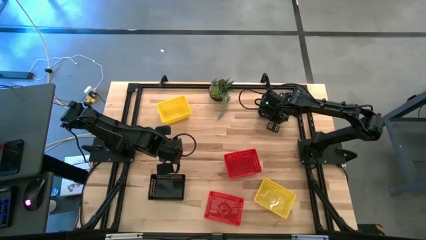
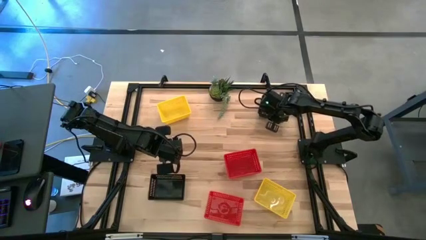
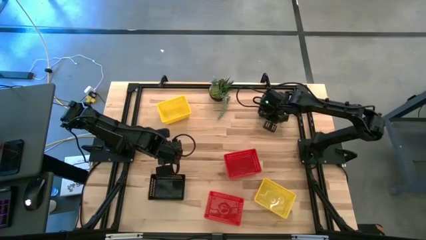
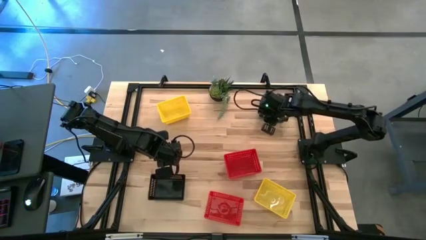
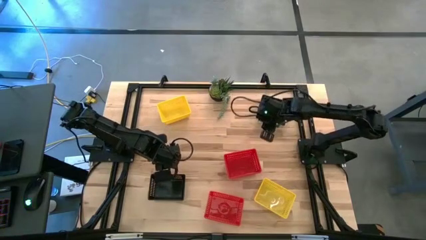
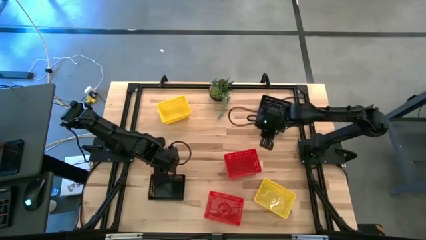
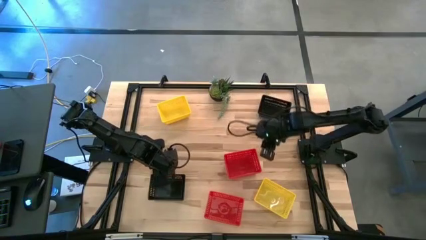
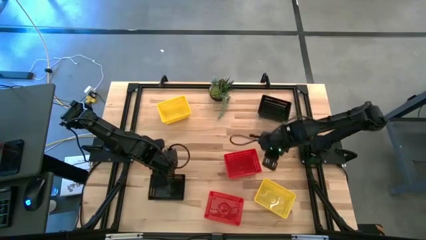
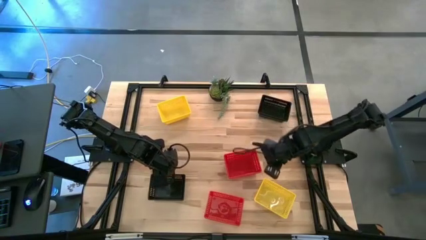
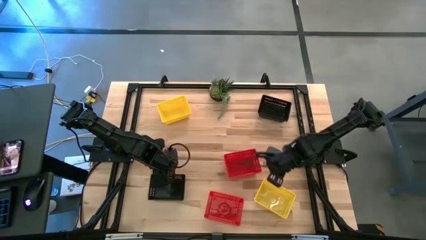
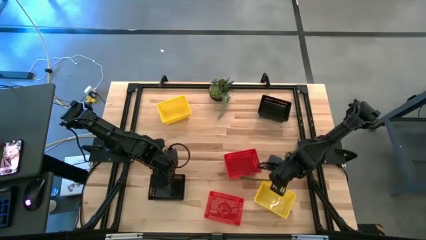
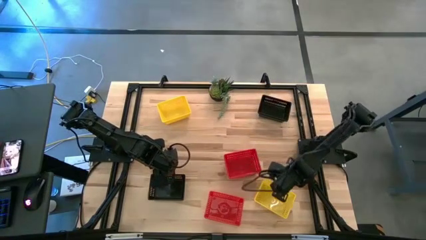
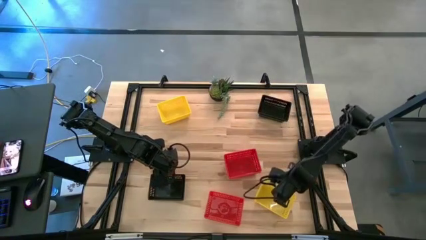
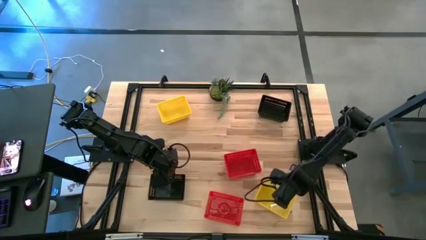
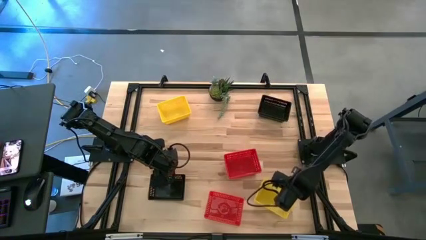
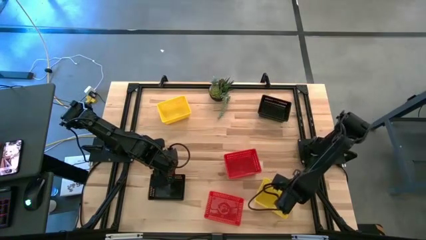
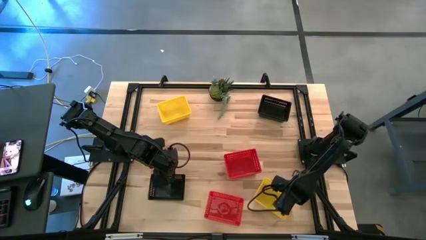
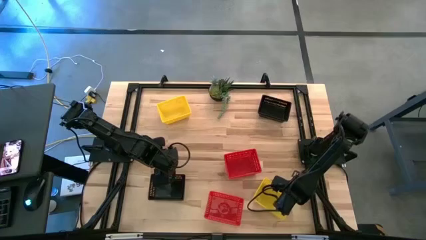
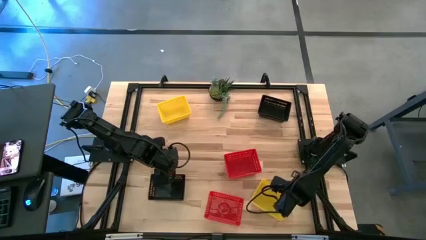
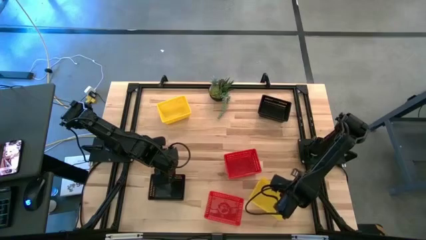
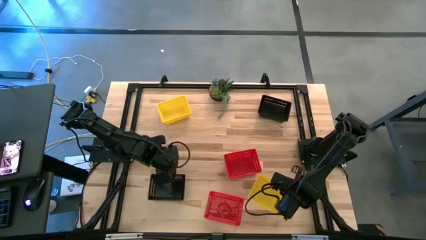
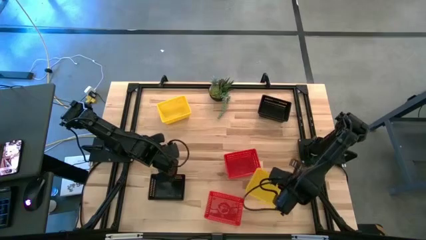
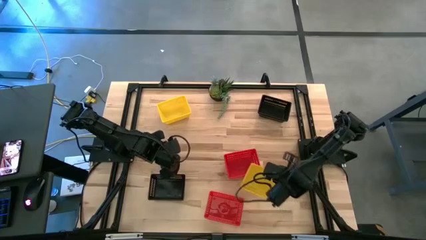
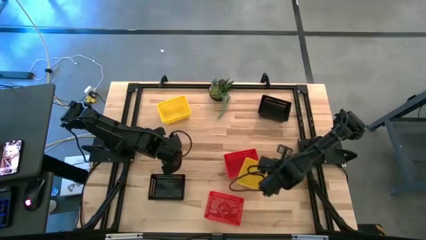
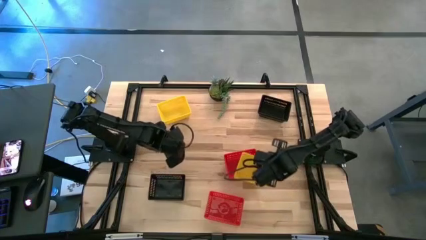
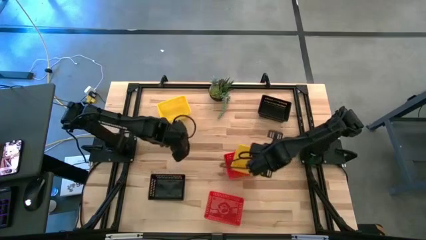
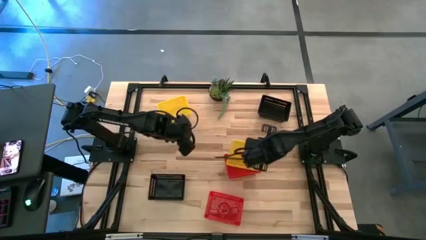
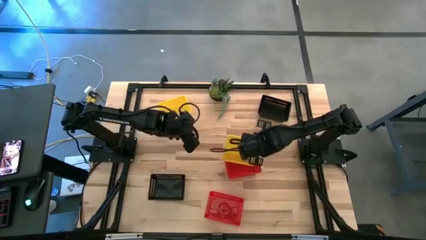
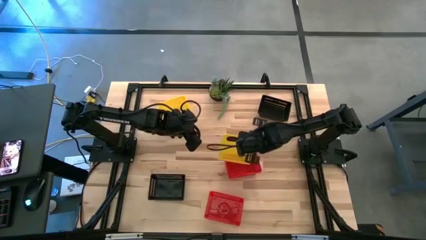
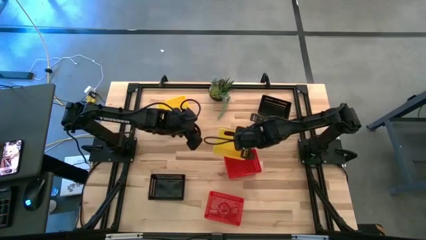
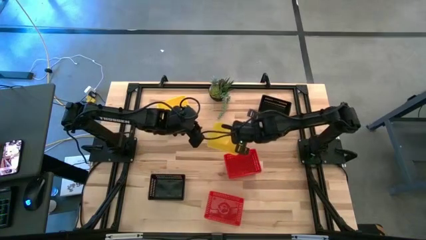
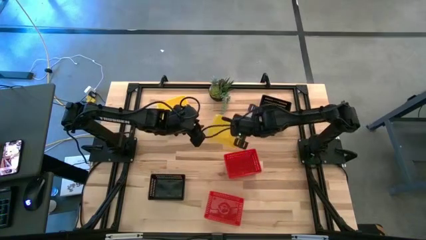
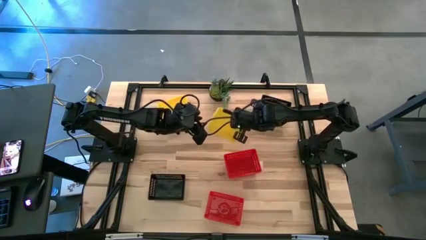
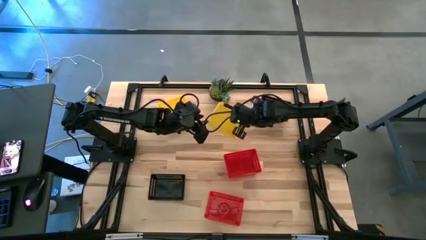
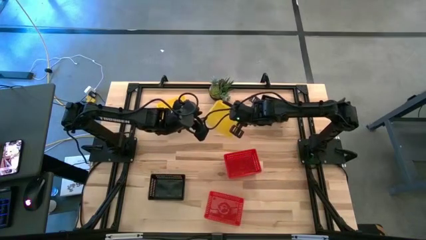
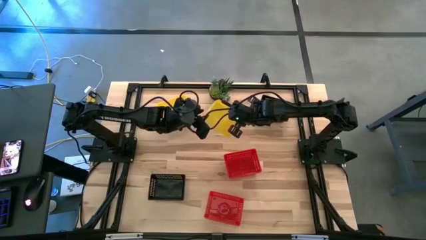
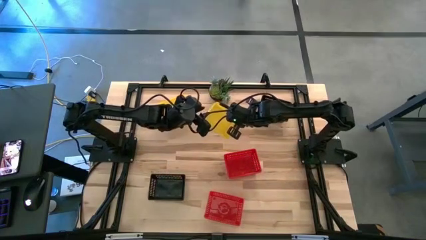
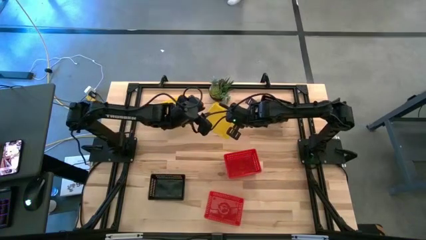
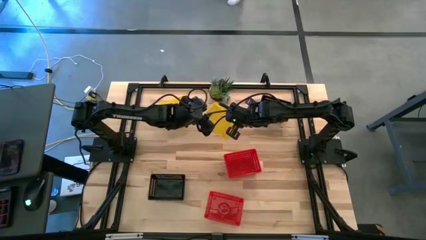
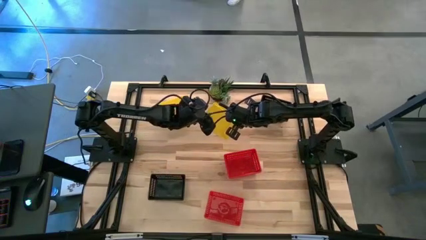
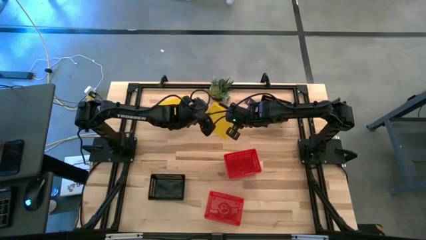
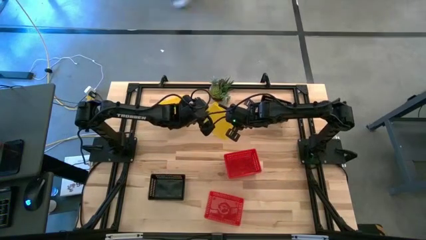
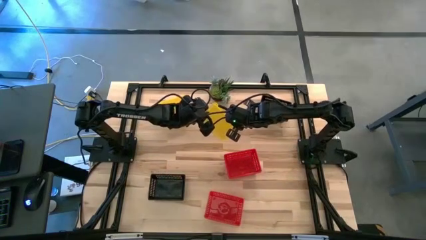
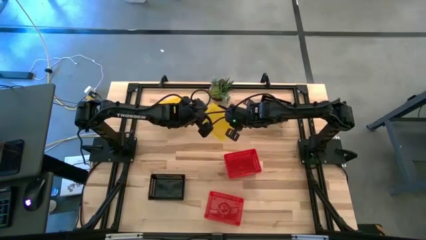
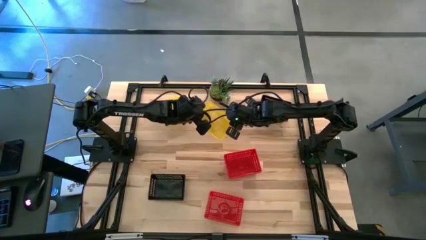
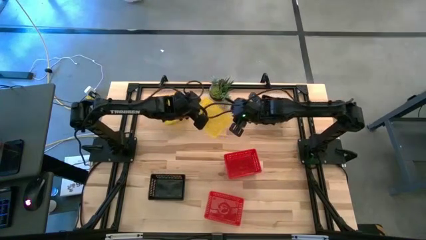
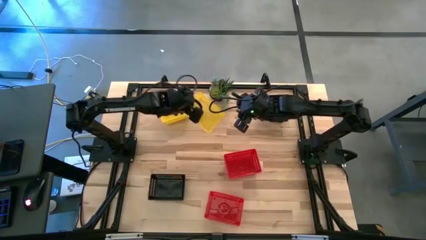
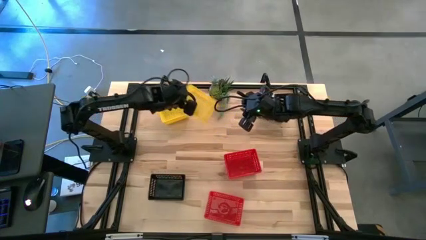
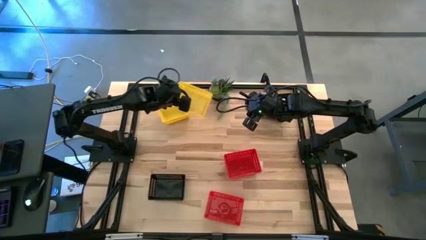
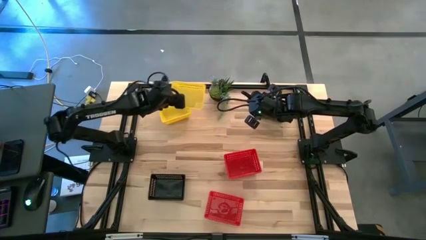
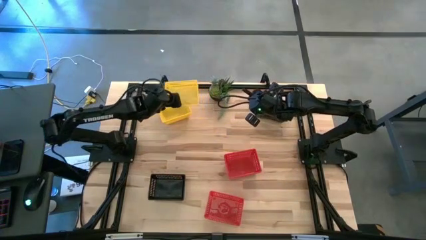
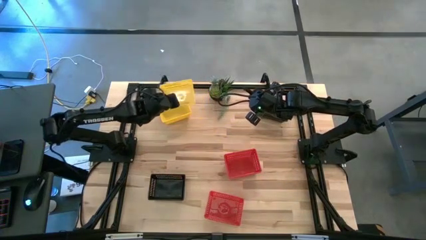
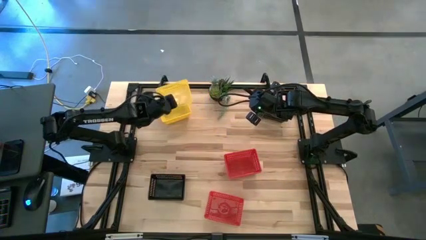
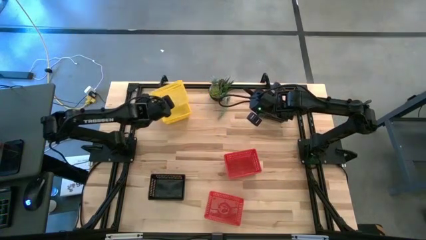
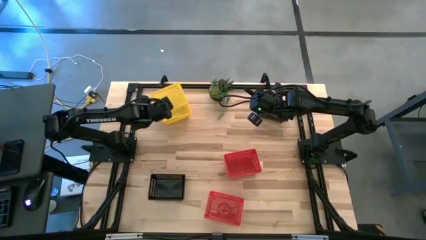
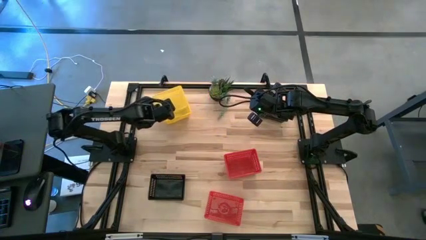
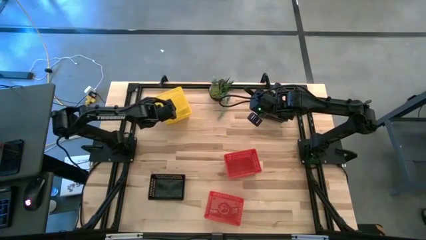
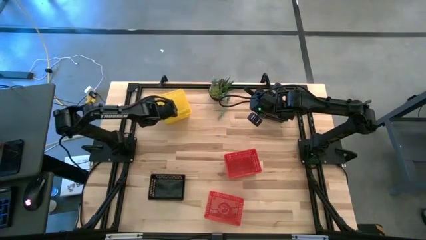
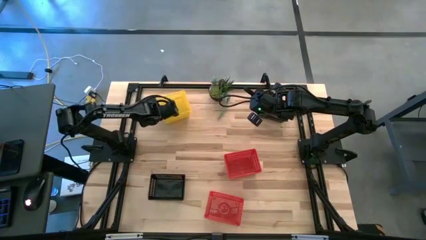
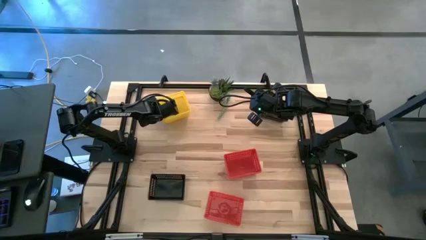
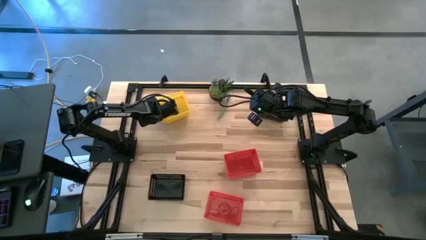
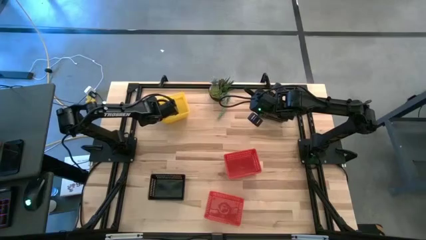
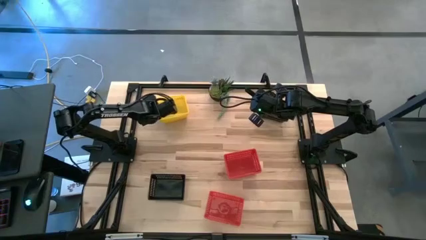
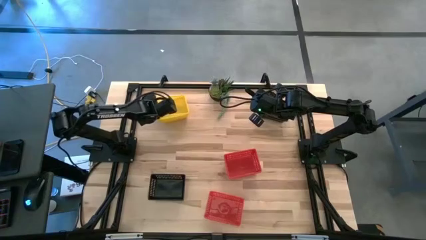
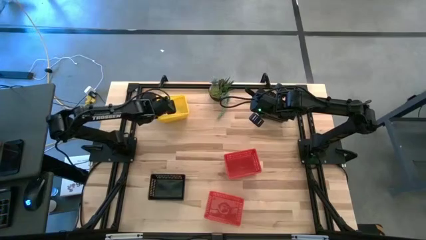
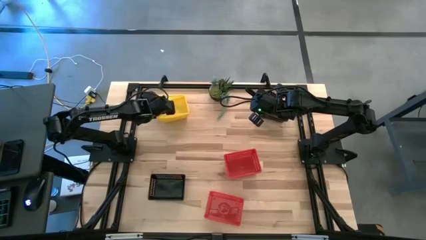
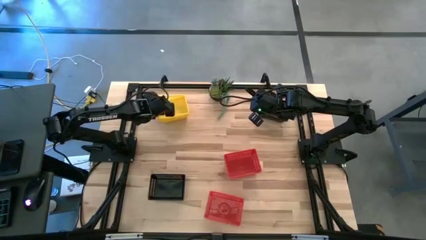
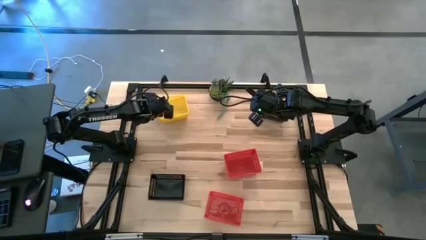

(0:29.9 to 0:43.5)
Stack the bottom yellow bin on top of the top yellow bin on the table

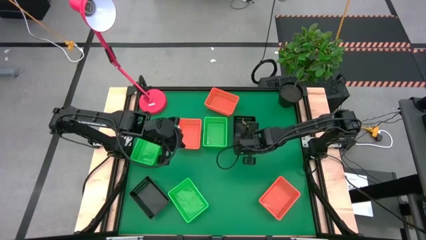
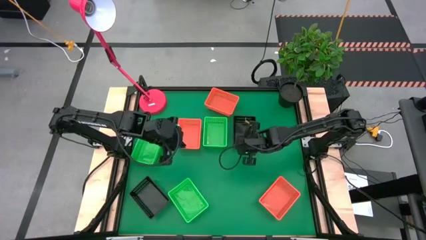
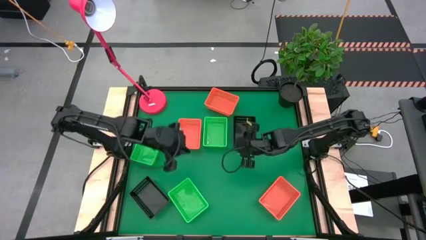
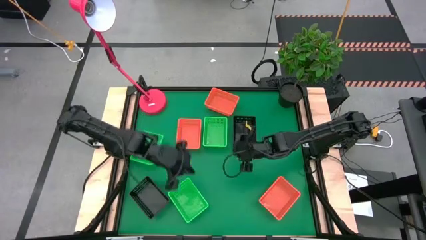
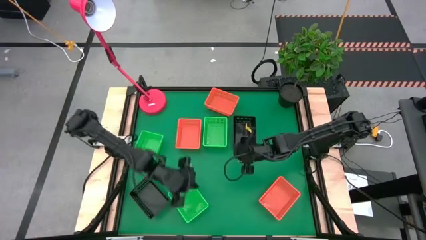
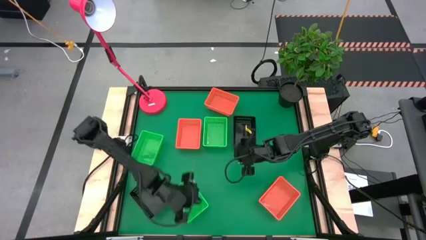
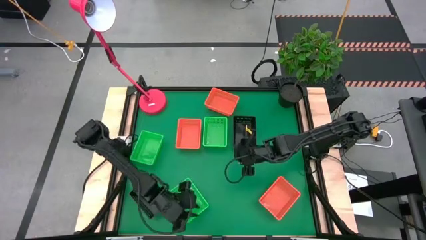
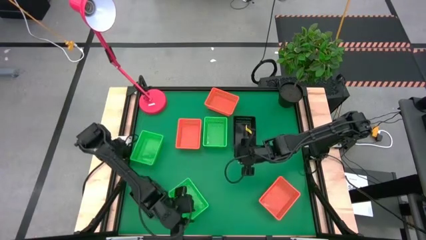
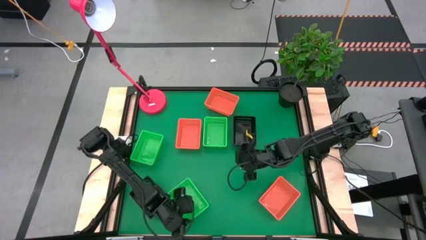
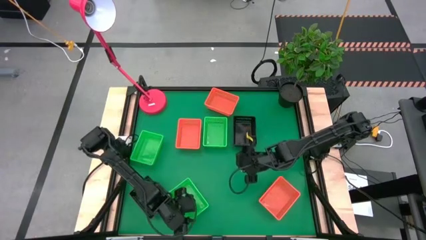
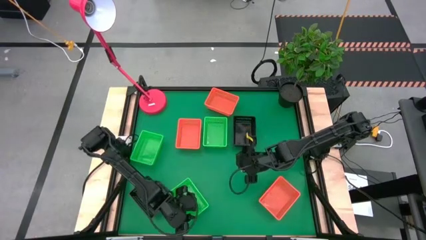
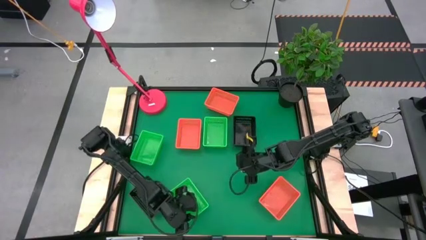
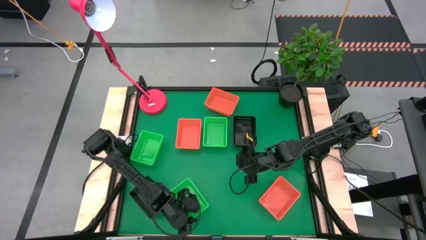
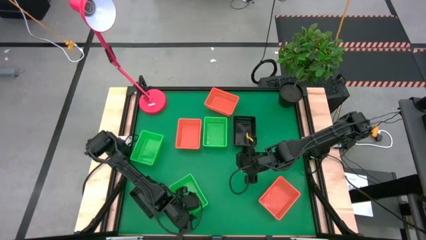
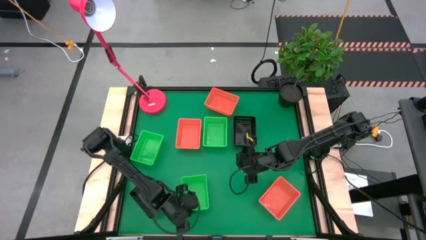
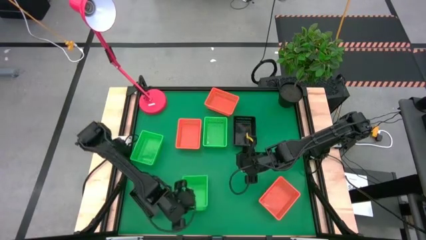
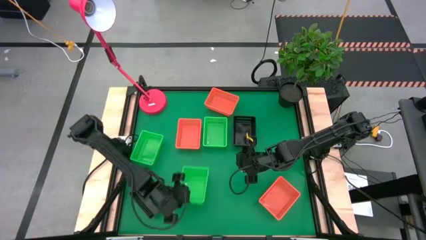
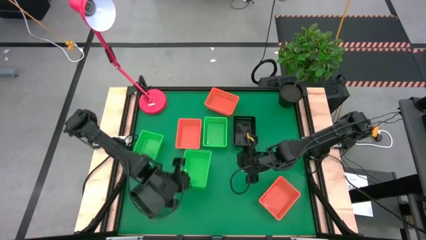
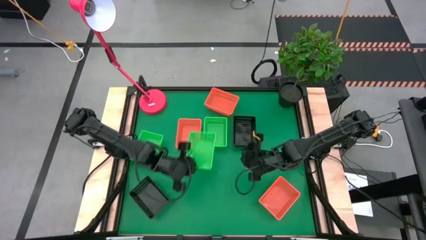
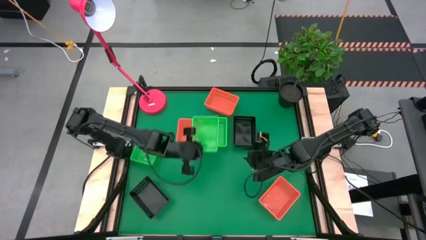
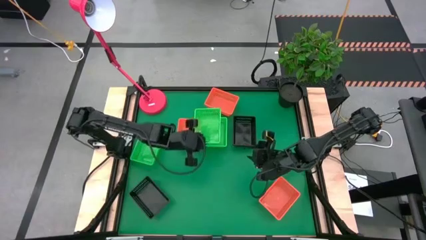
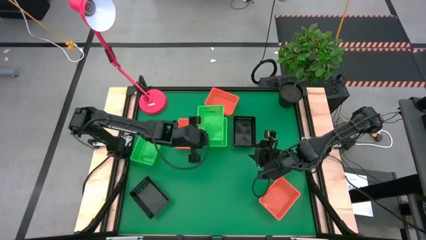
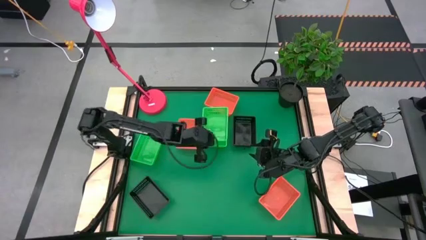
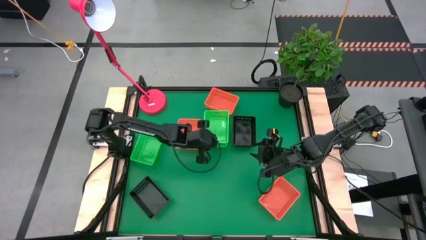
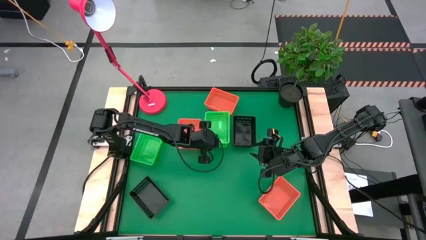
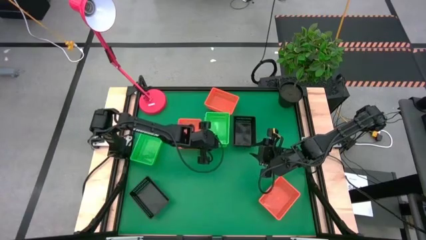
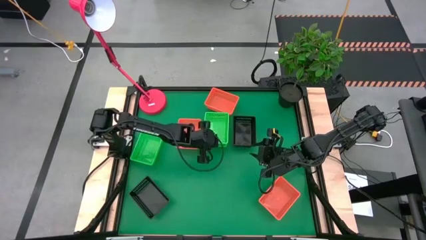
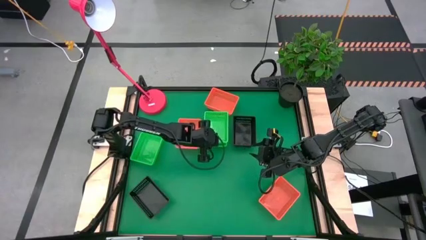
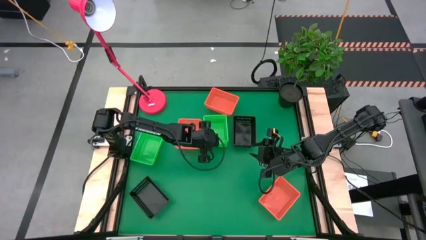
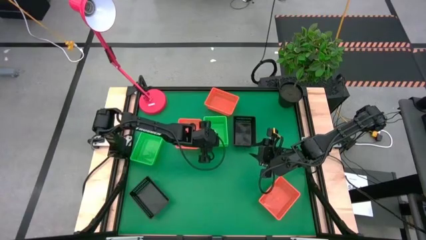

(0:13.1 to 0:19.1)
Stack the bottom green basket on top of the other top right green basket
